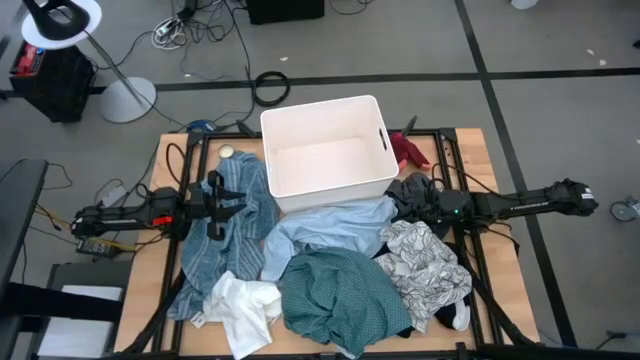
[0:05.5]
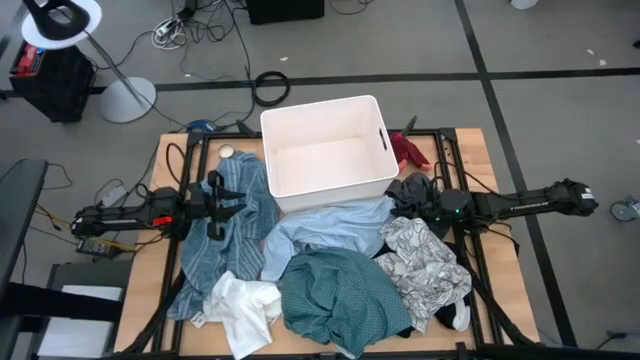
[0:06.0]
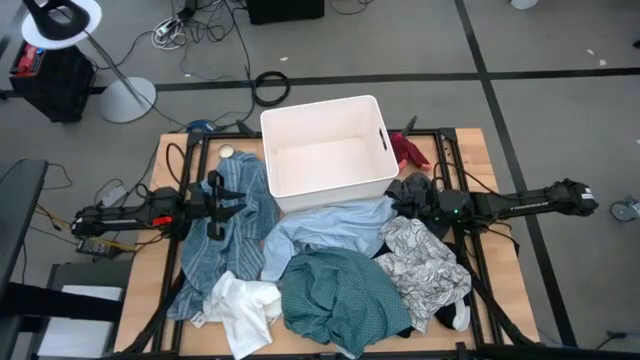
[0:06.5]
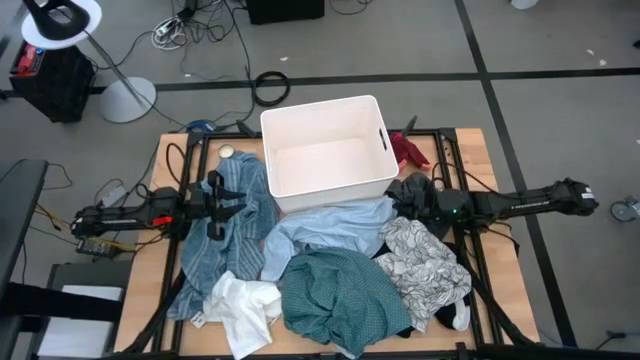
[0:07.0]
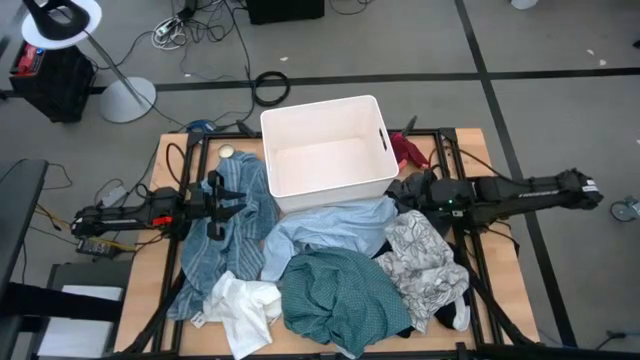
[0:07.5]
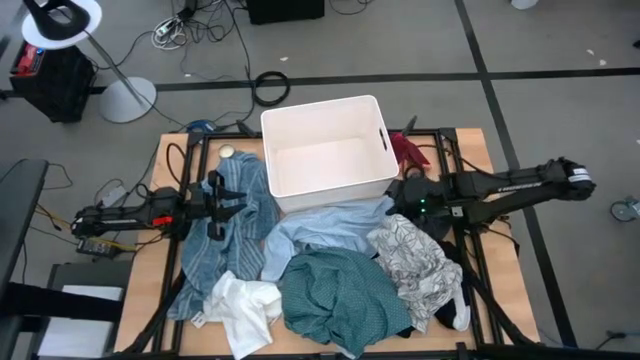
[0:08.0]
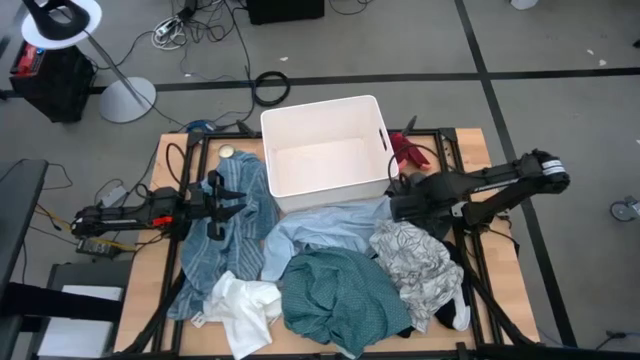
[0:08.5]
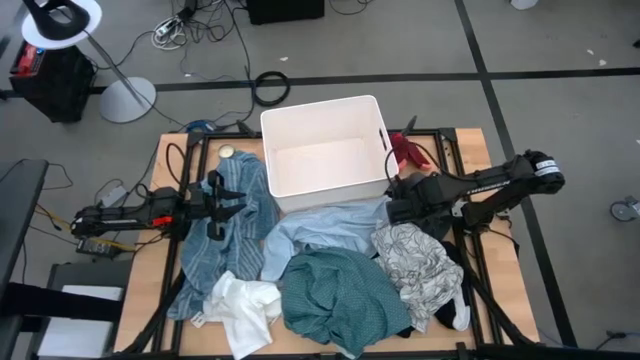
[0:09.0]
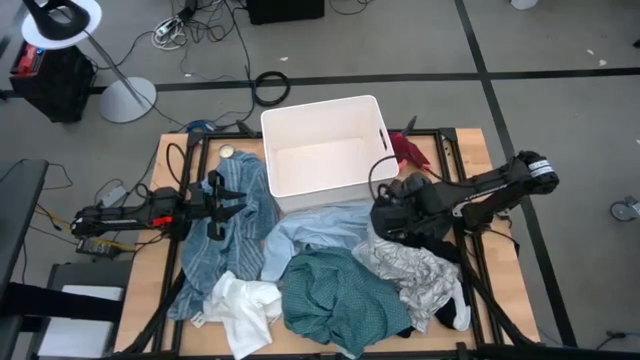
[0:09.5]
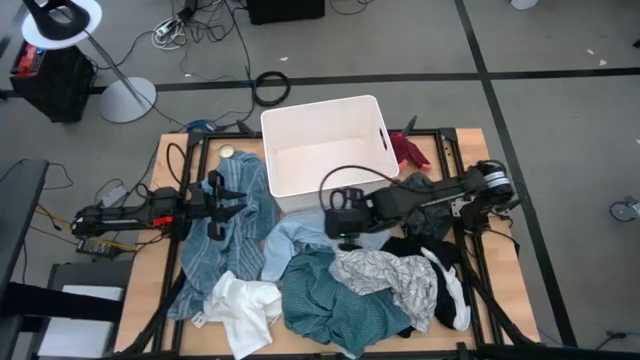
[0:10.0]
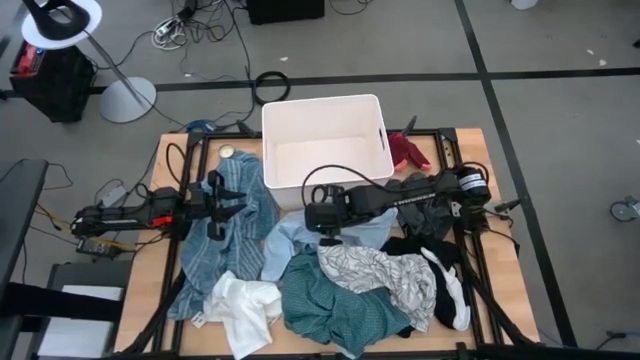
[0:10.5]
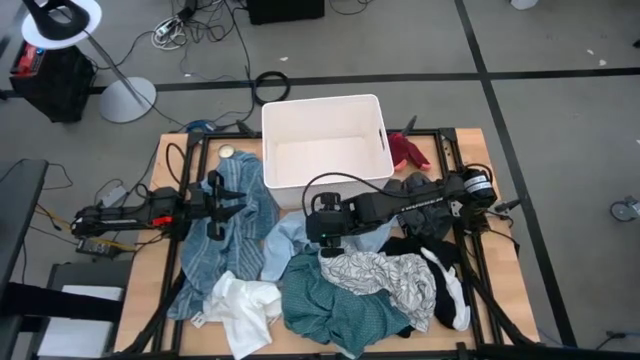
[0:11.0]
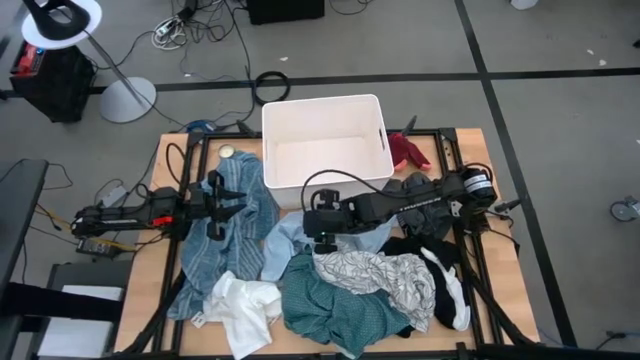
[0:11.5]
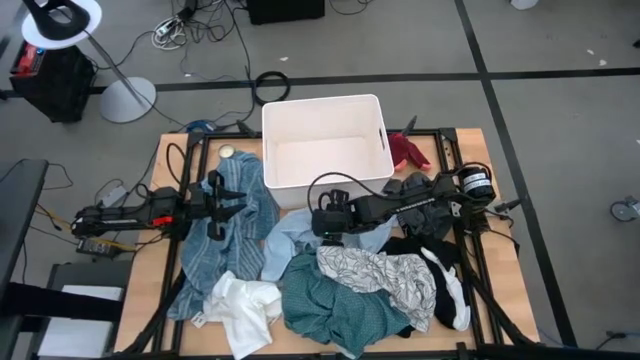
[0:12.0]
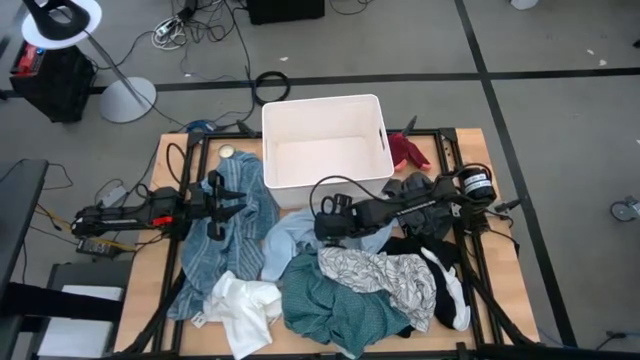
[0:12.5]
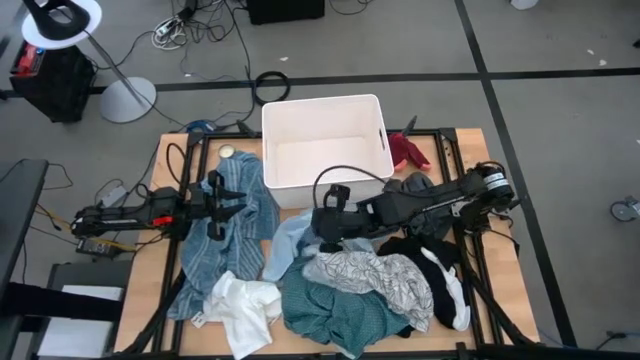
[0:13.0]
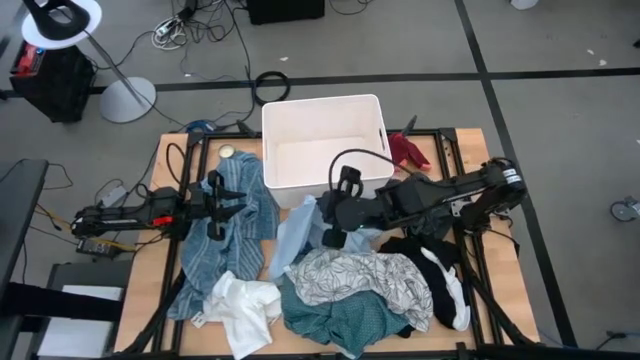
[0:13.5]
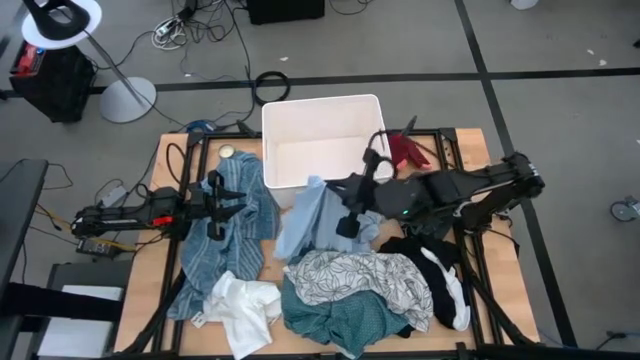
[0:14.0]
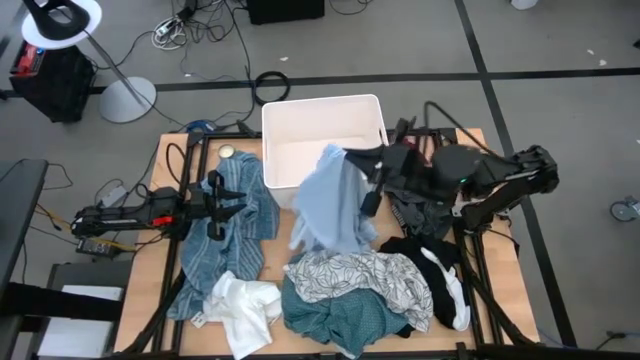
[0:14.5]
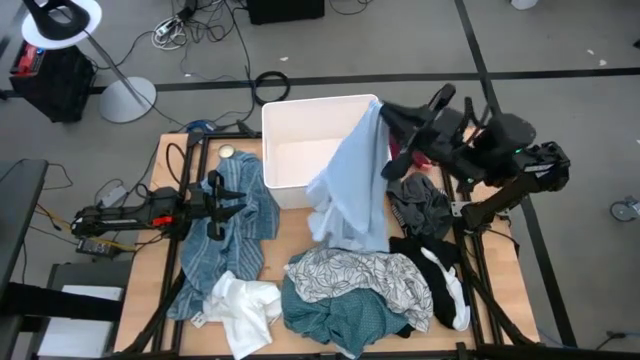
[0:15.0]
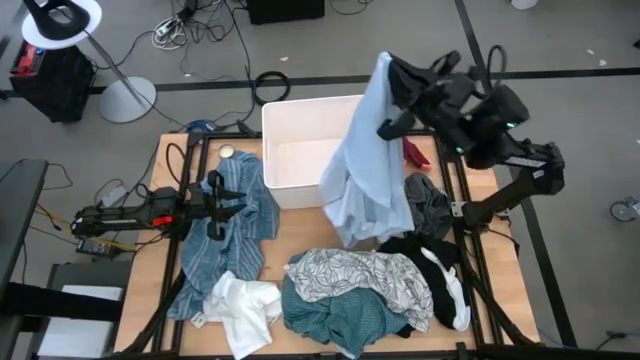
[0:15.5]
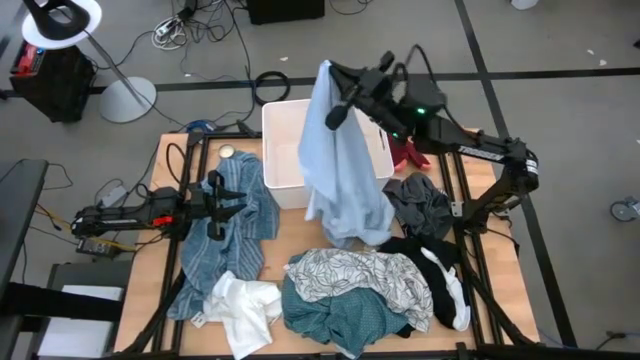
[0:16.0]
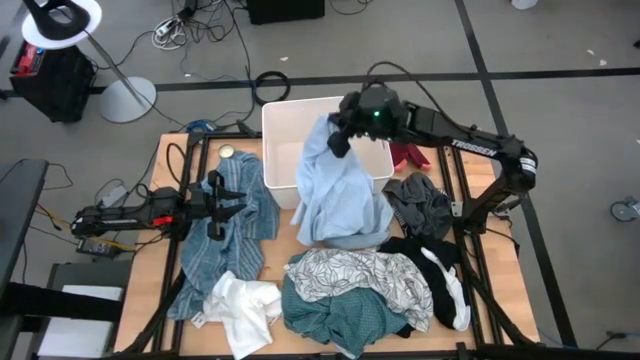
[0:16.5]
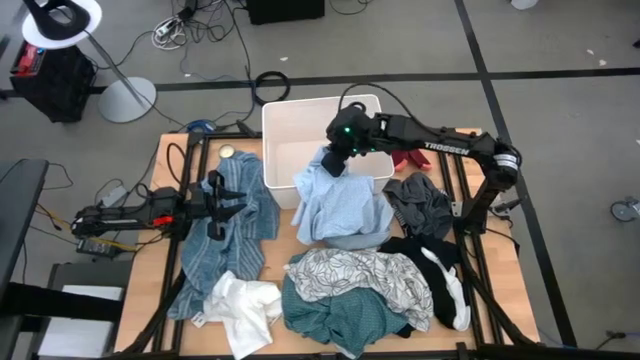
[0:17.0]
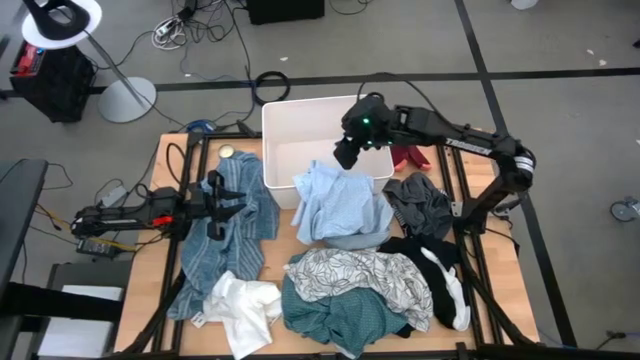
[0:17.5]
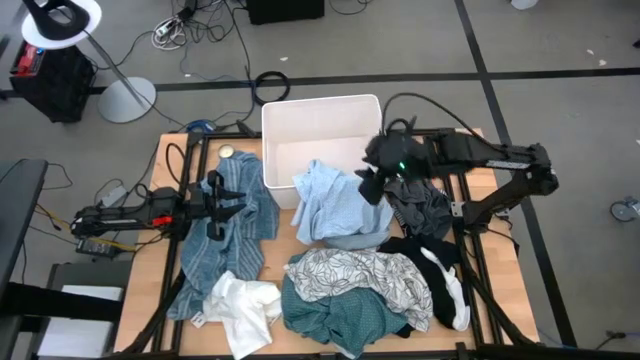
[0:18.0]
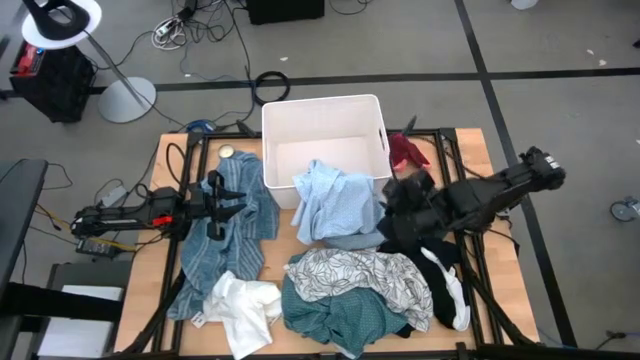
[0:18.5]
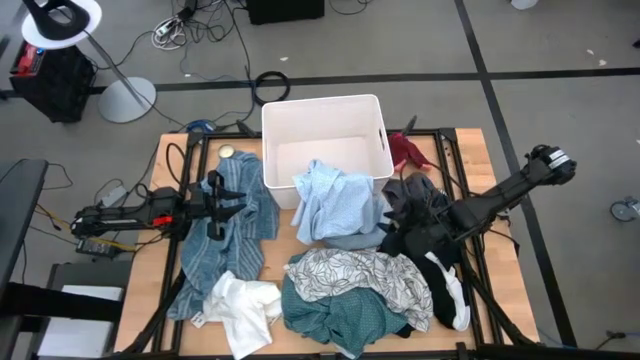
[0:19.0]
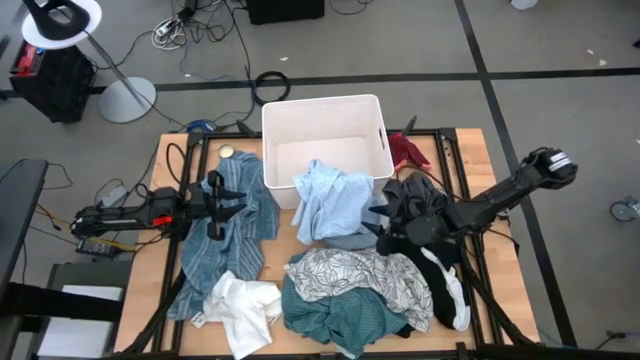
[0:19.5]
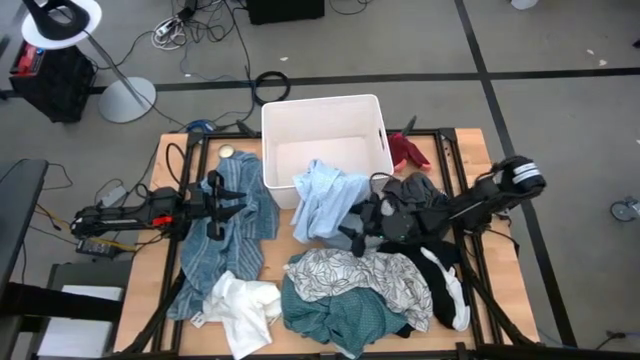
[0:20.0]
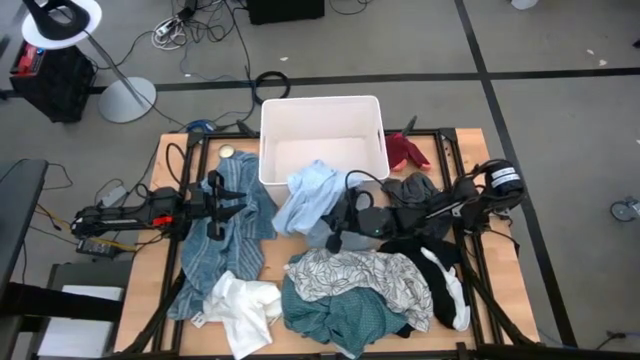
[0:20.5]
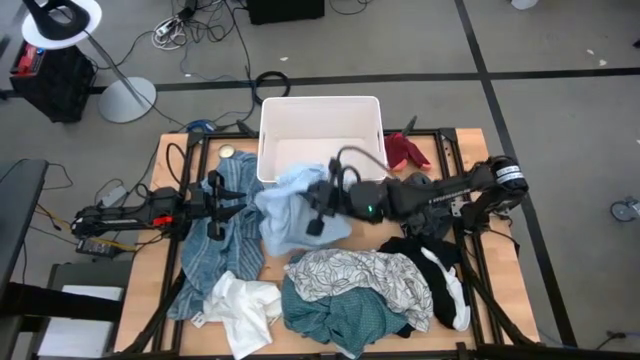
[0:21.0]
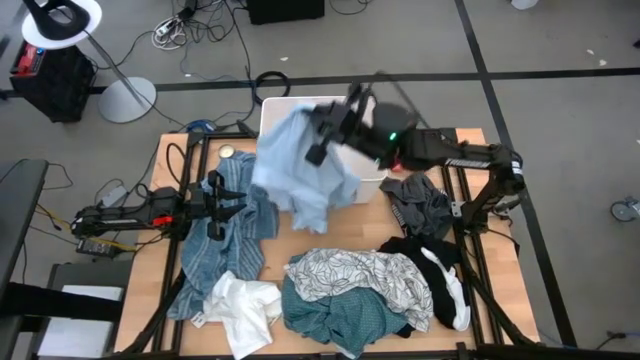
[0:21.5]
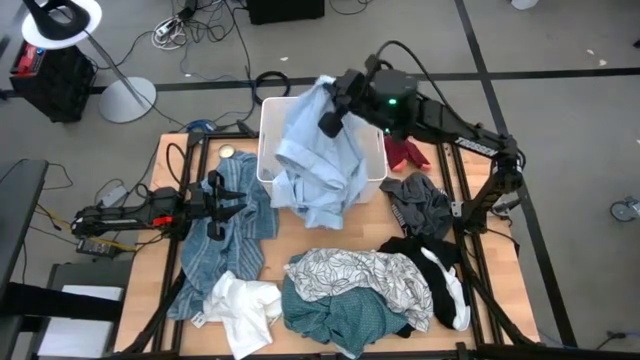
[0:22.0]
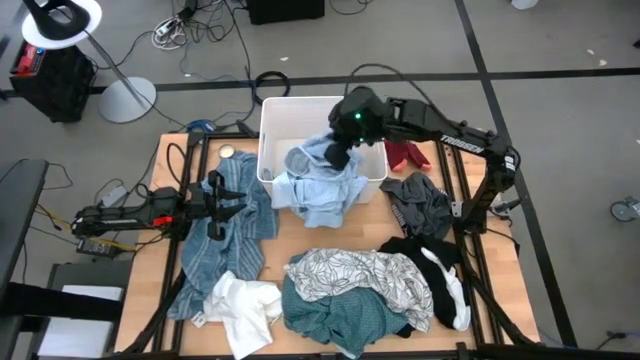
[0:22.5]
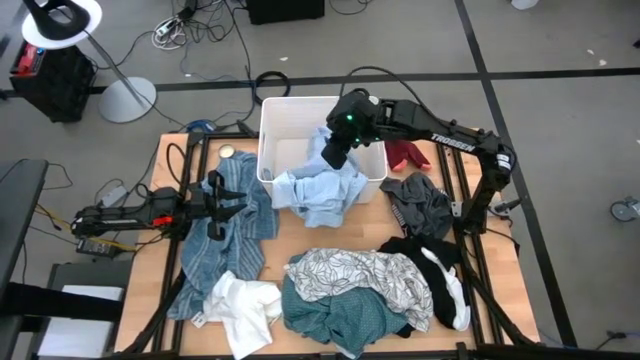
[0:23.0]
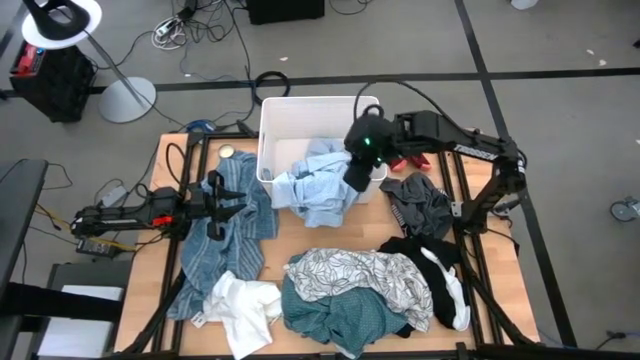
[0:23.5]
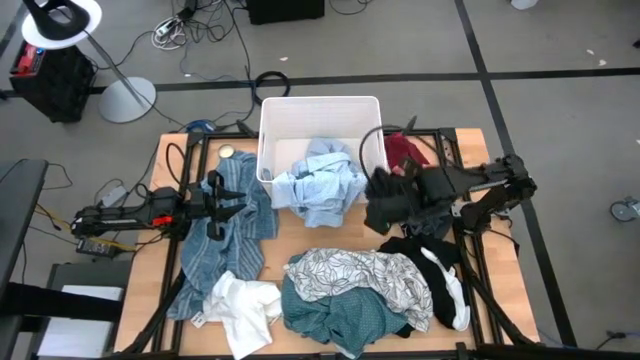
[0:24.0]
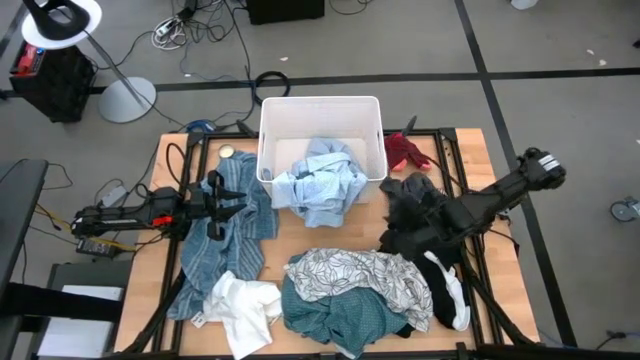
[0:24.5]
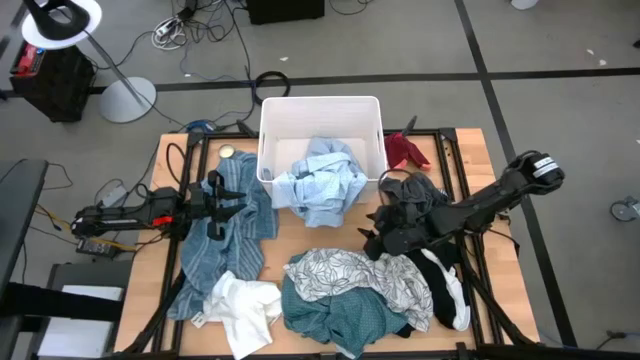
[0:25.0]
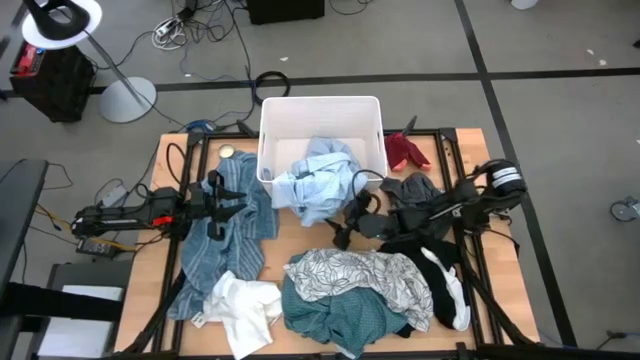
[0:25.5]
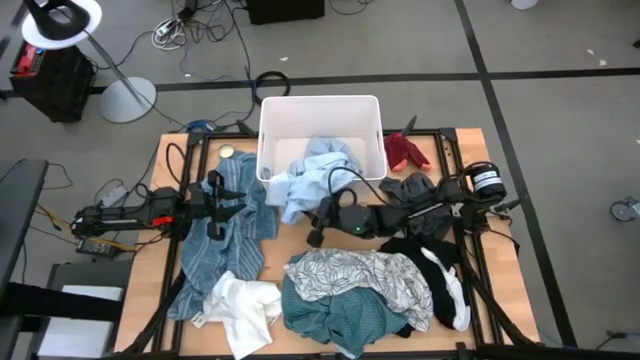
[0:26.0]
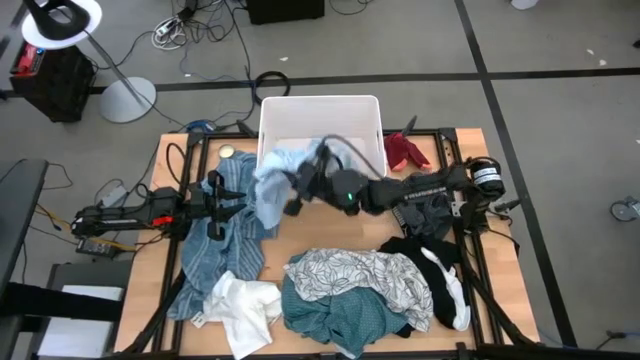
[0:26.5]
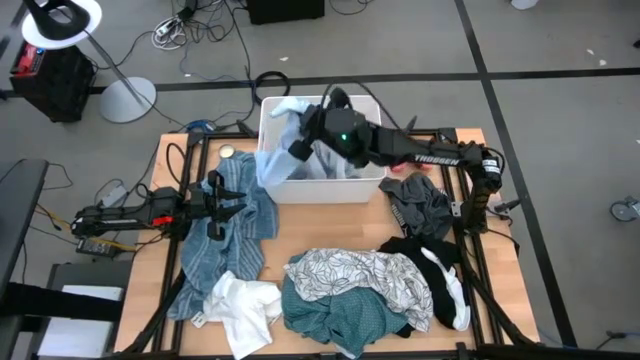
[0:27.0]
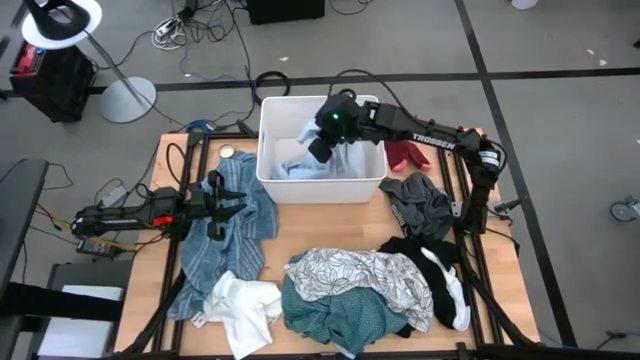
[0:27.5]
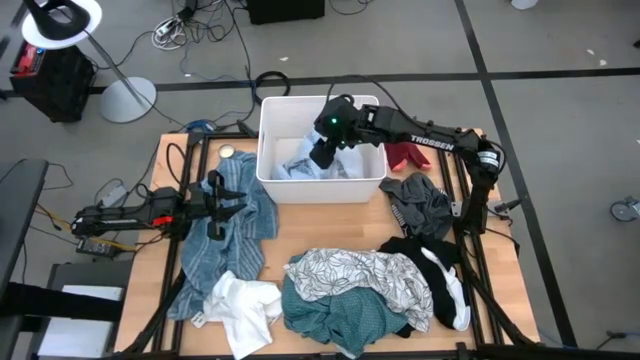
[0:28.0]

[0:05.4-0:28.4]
Task: Sort clothes
Put the light blue shirt into the white laundry organizer
